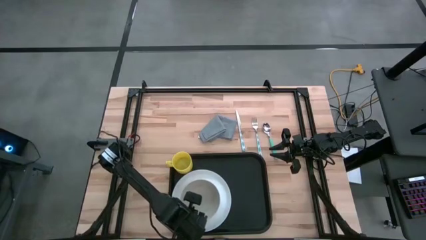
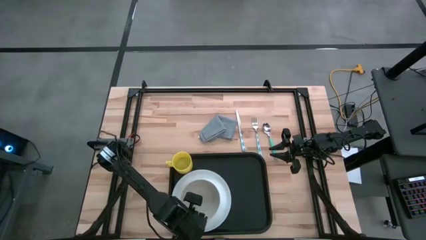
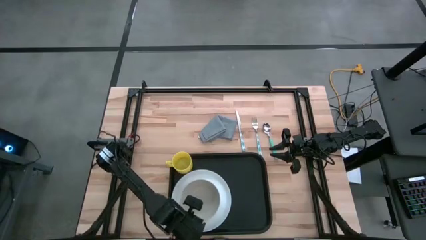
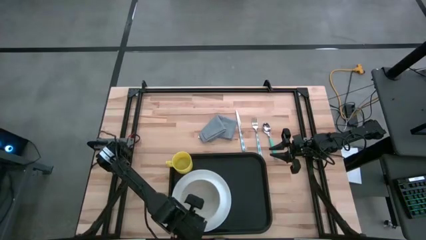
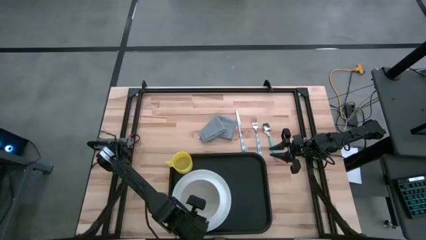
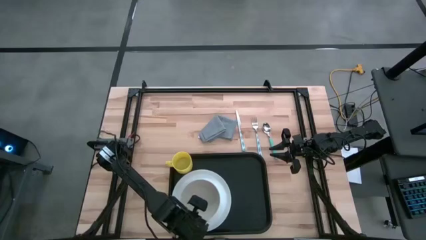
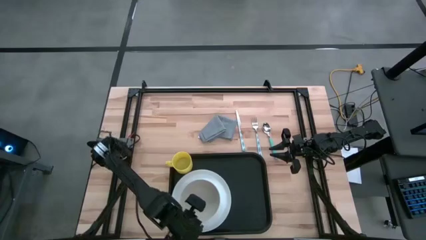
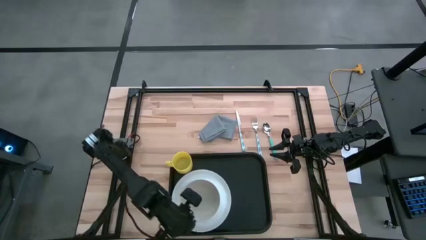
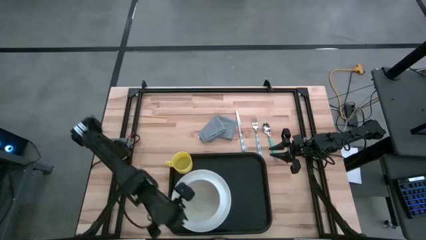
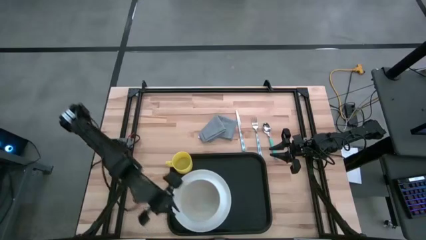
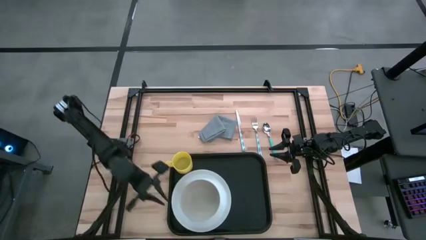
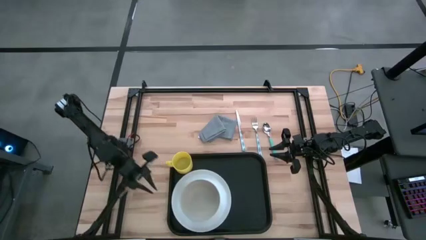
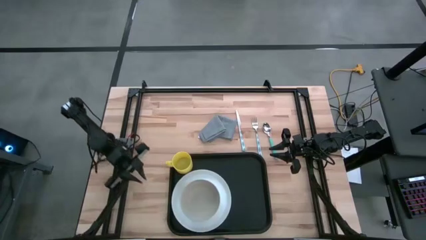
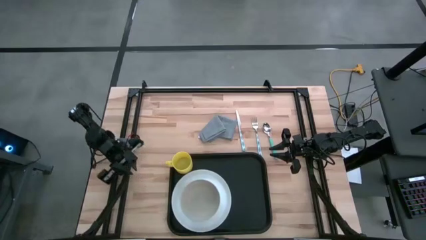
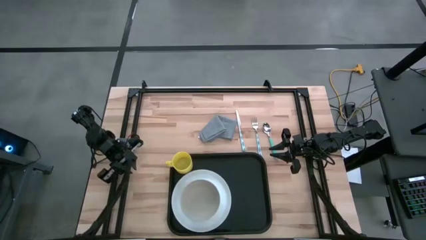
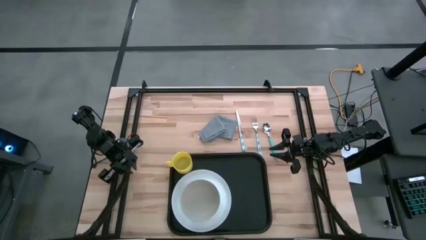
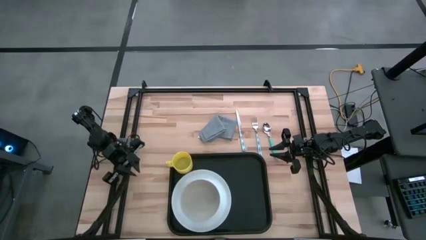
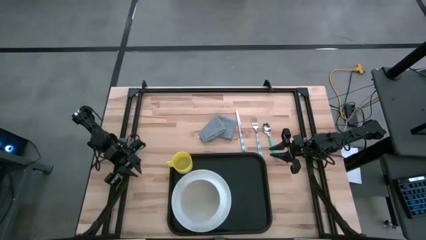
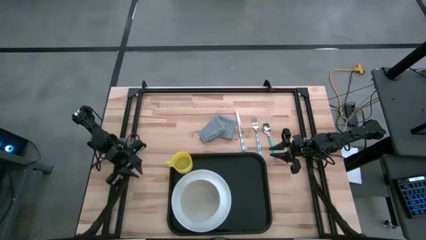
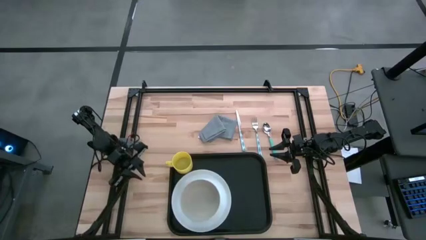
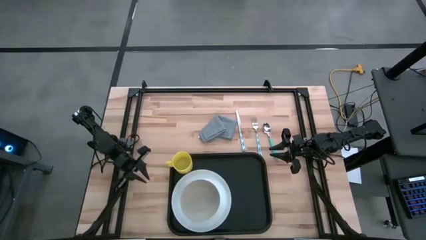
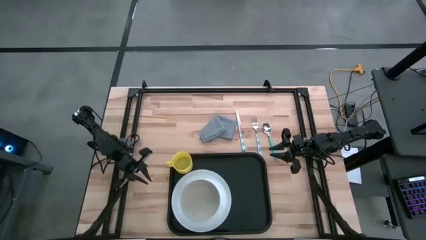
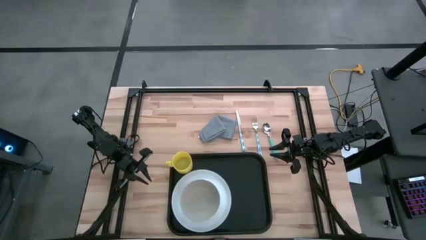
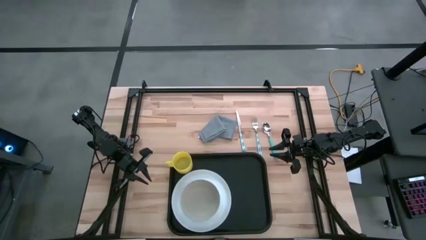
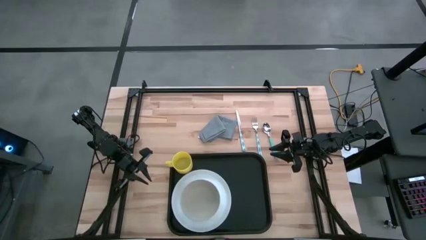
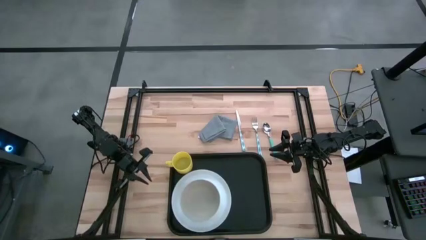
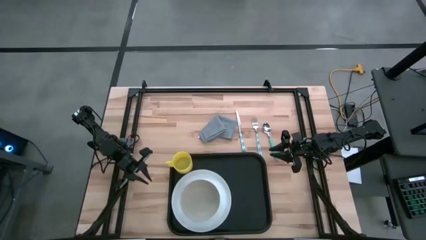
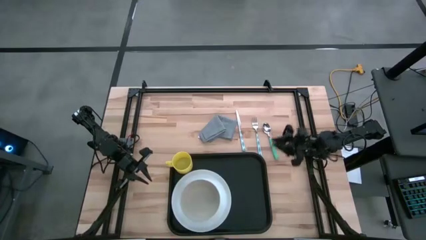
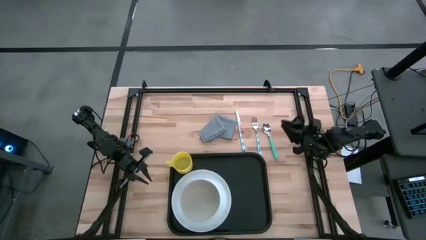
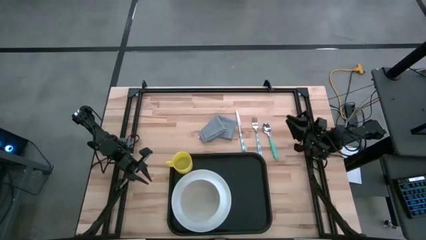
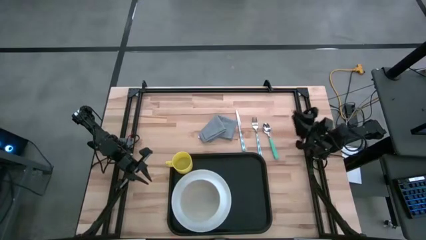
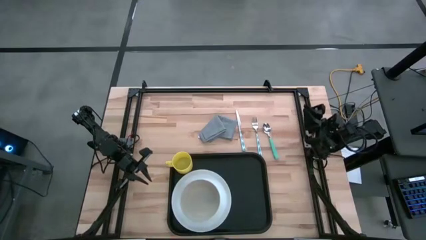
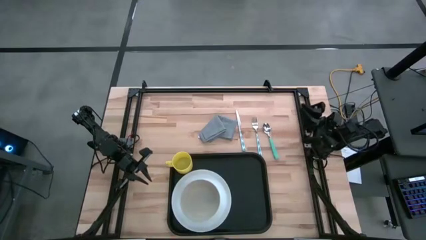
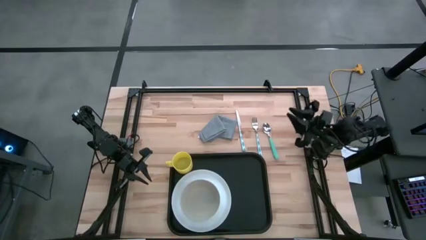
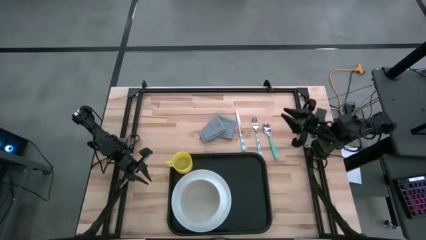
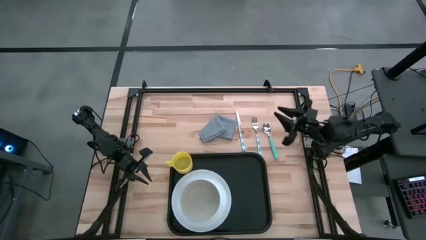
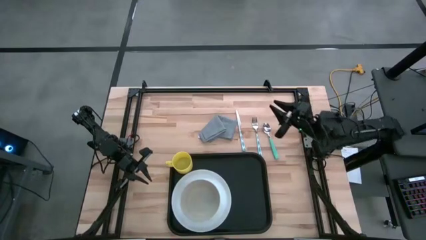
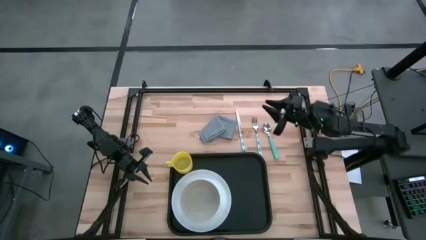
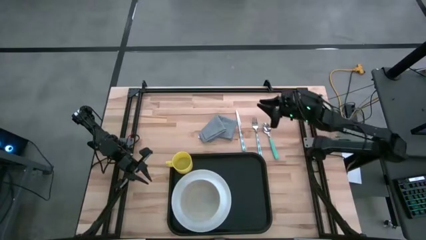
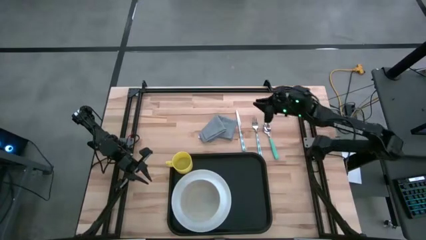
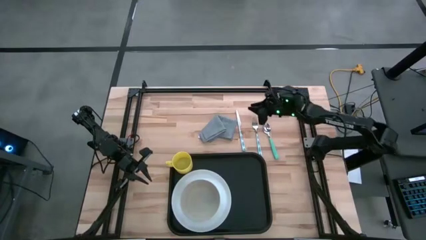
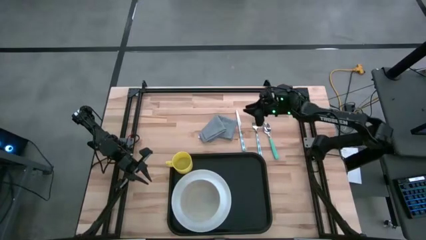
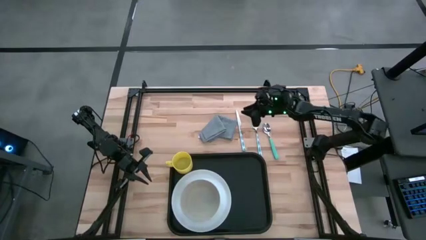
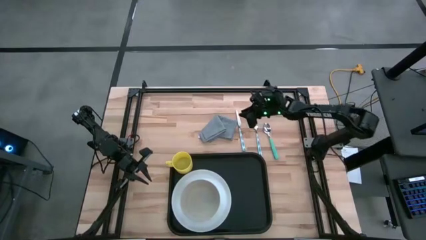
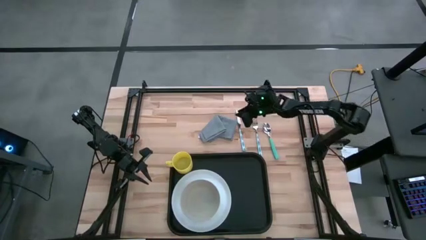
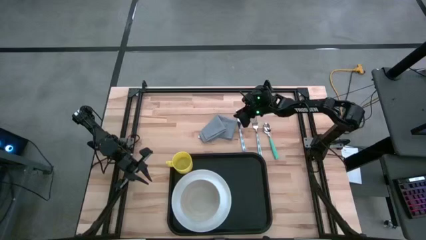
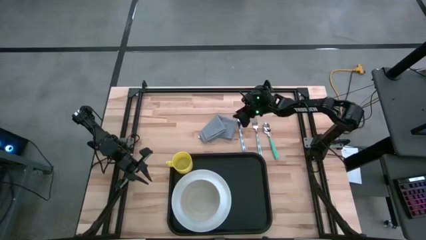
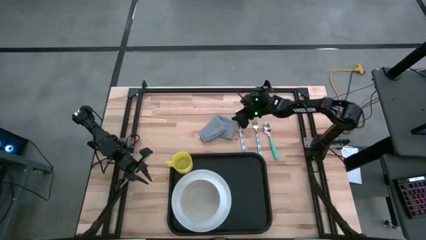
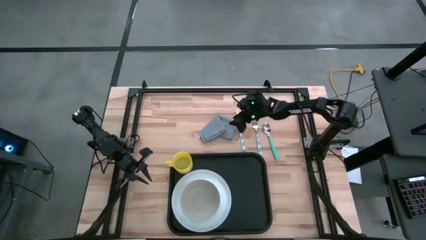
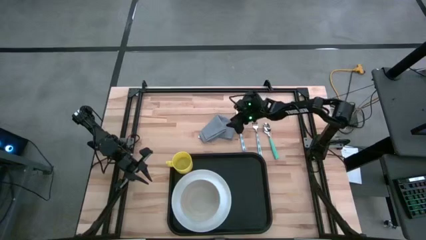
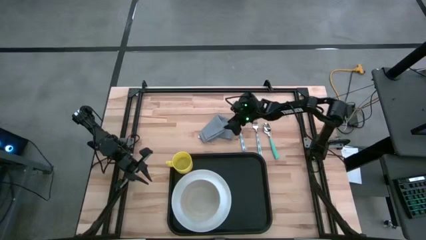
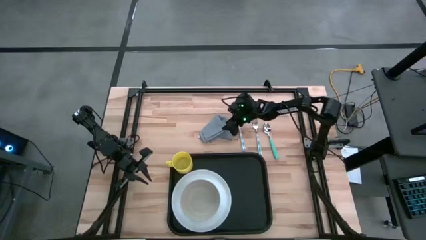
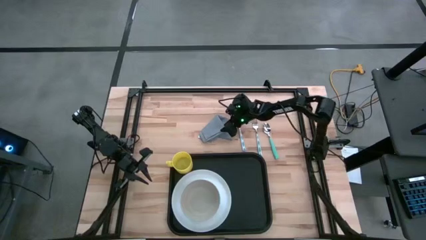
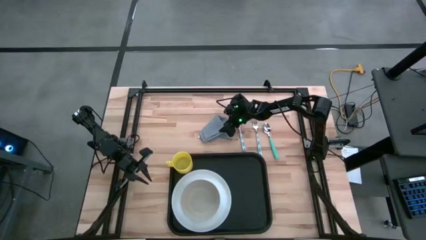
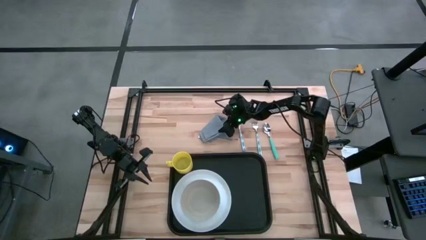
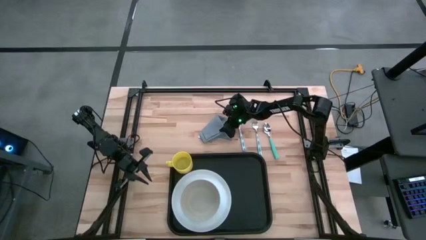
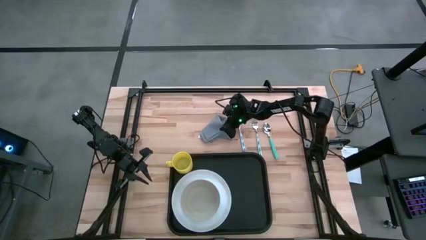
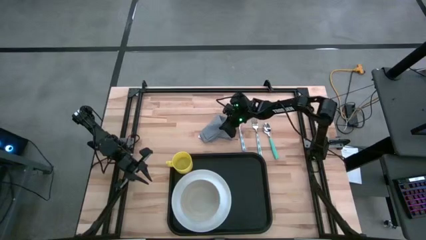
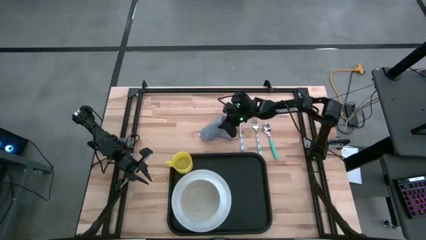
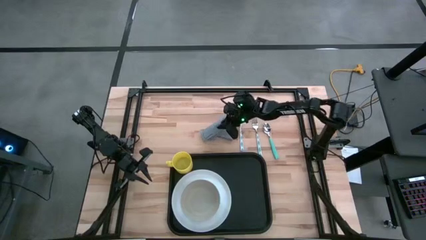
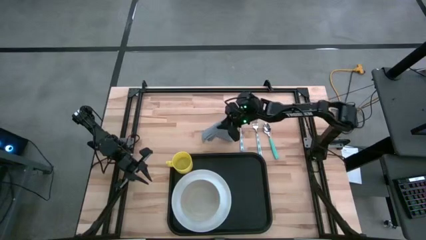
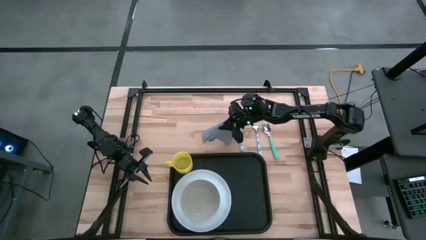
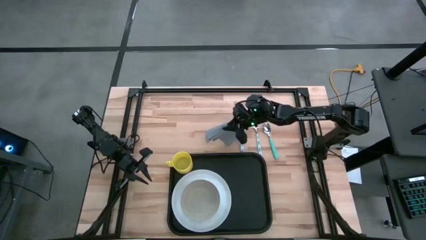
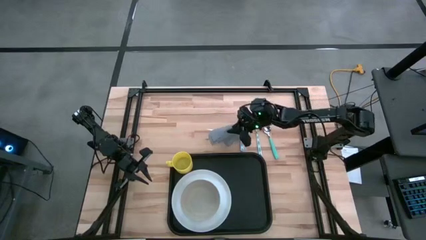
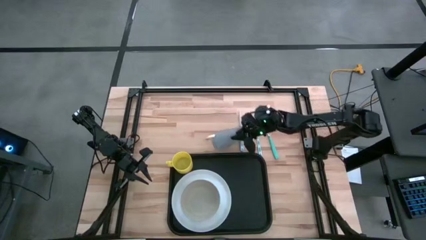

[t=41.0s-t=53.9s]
Task: Set up tray
Put the gray napkin on the black serving tray to the right of the white plate

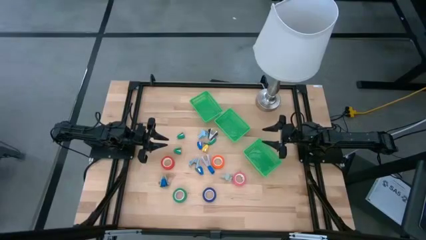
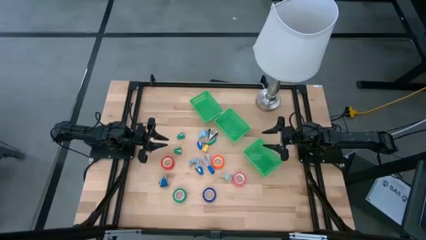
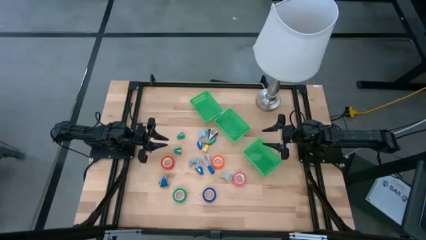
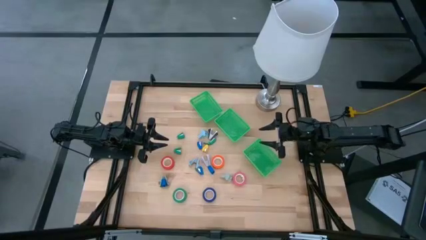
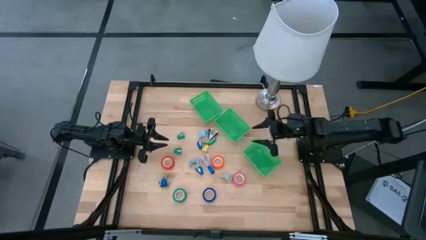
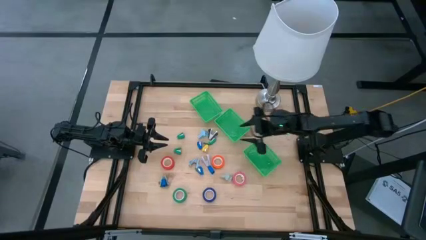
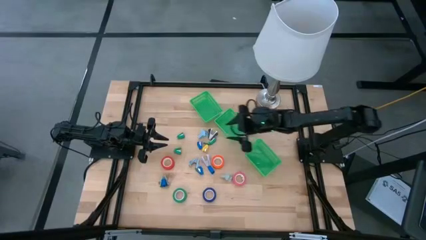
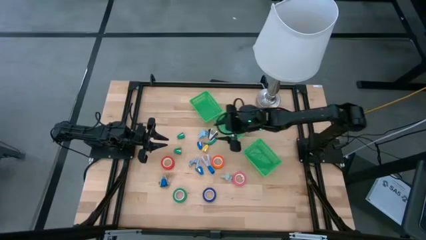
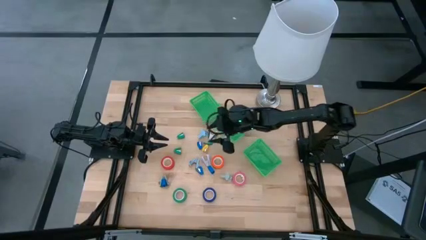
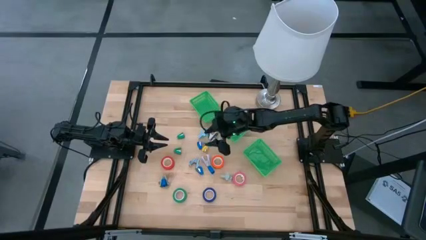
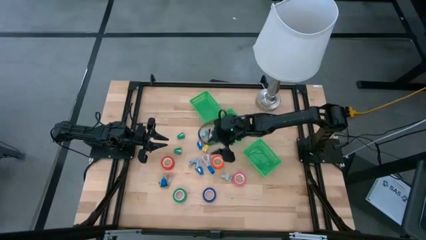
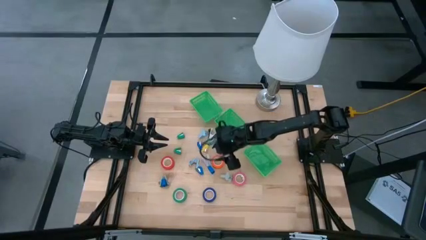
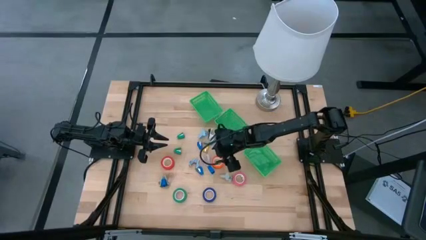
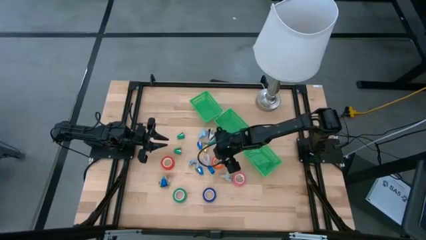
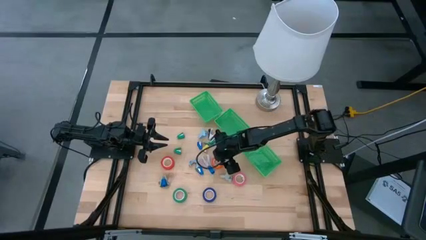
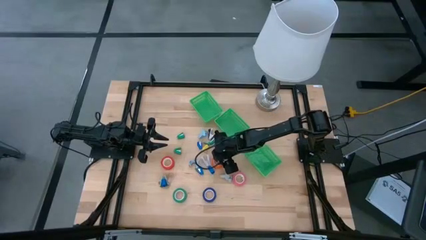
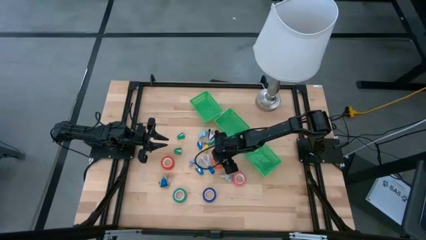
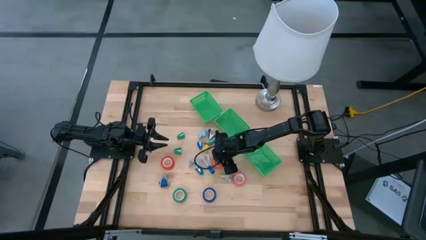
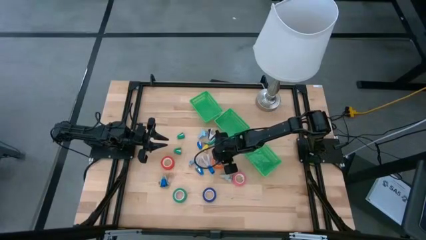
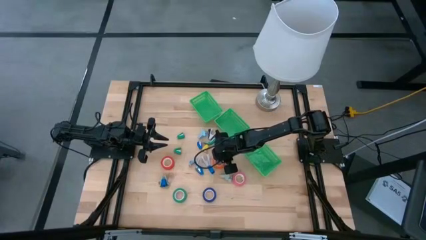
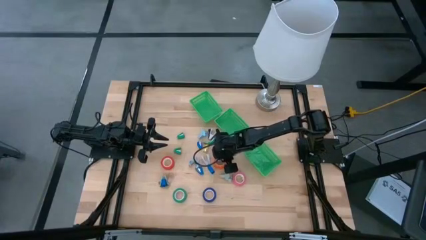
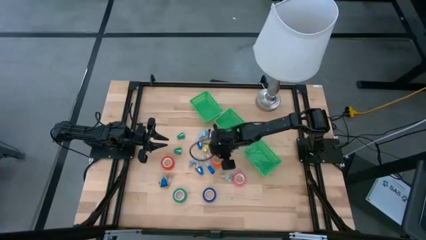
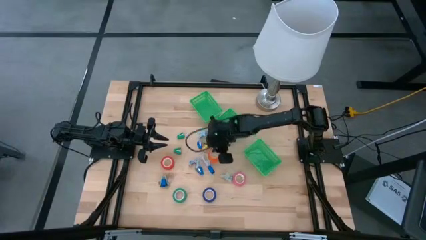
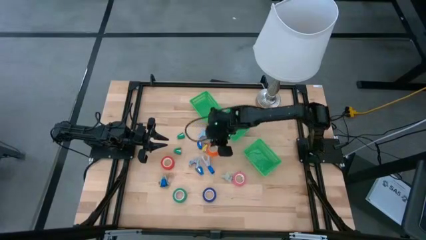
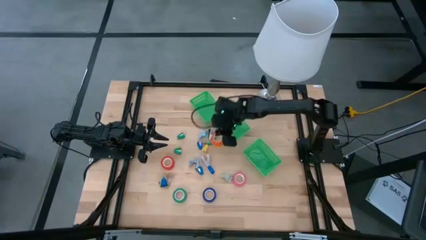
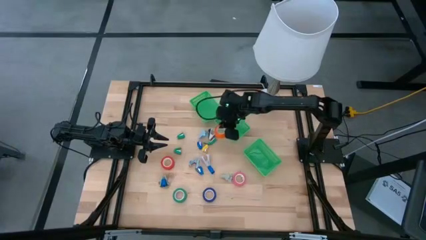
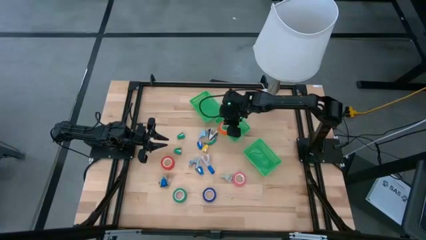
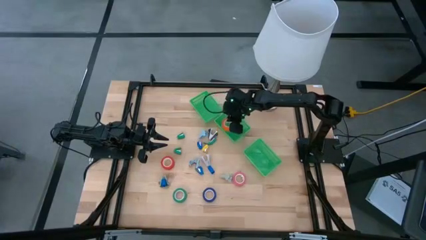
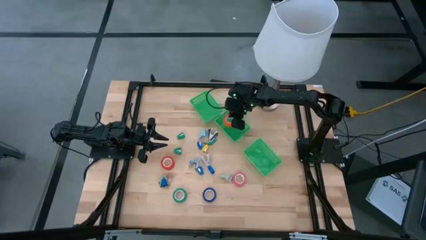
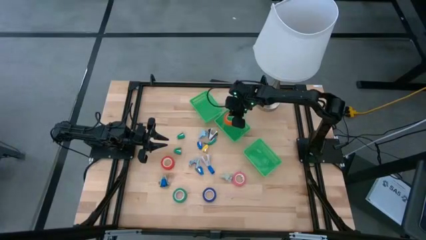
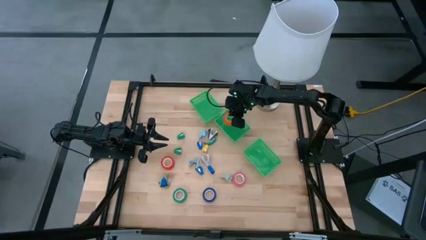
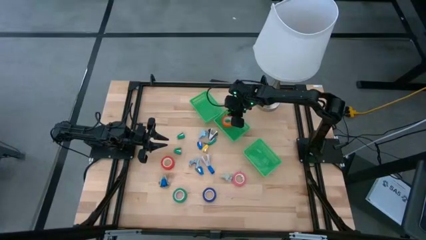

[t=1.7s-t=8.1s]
Task: Pick and place Stapler, Stapler remover, tape
Put the orange tape into the middle basket
